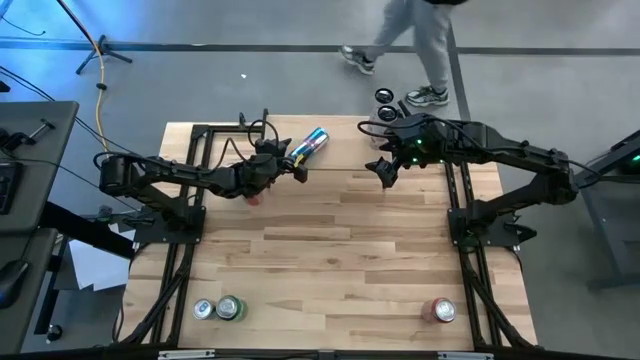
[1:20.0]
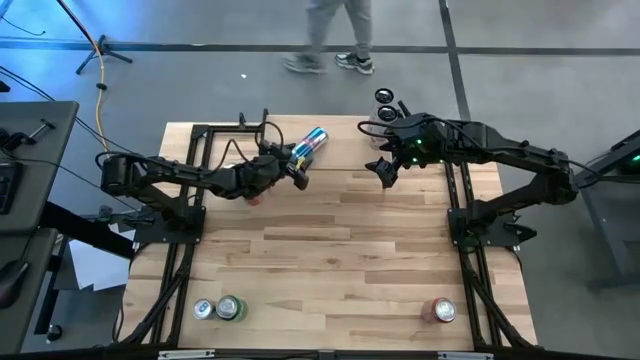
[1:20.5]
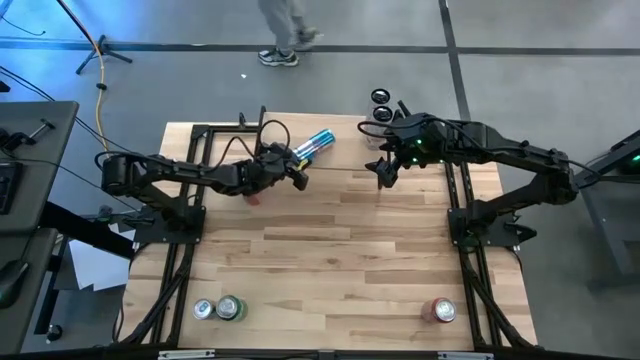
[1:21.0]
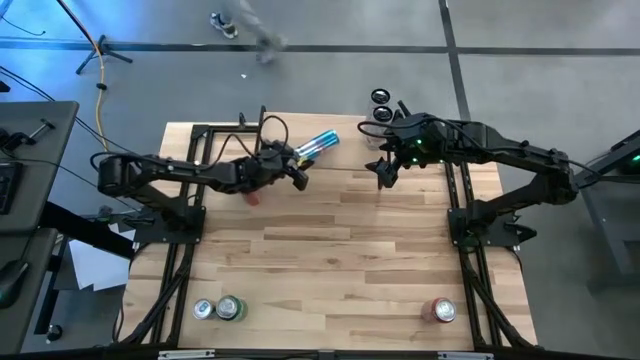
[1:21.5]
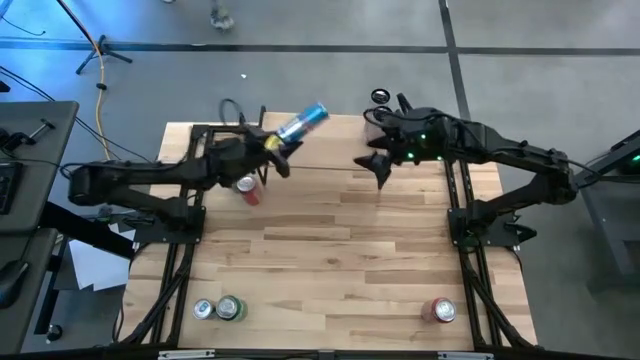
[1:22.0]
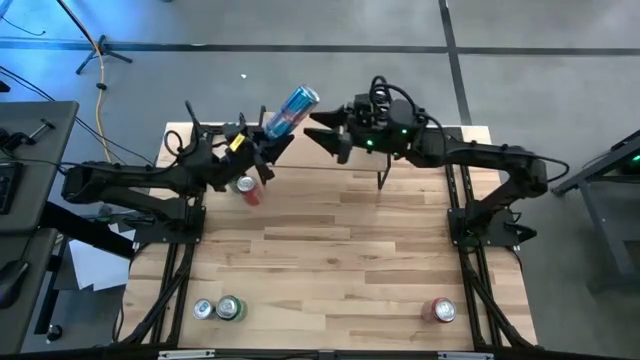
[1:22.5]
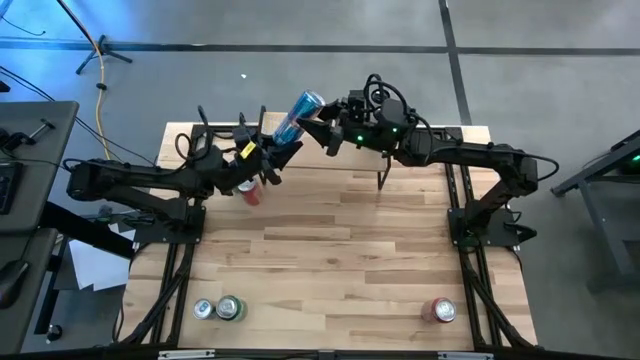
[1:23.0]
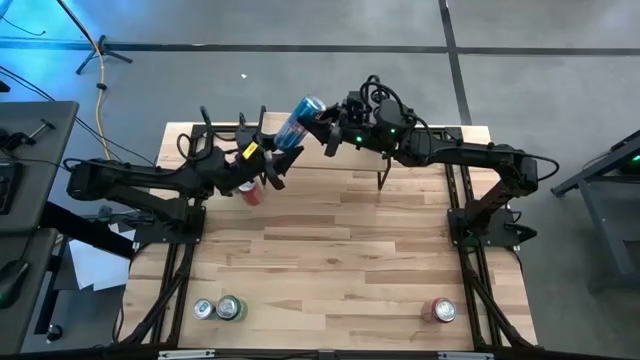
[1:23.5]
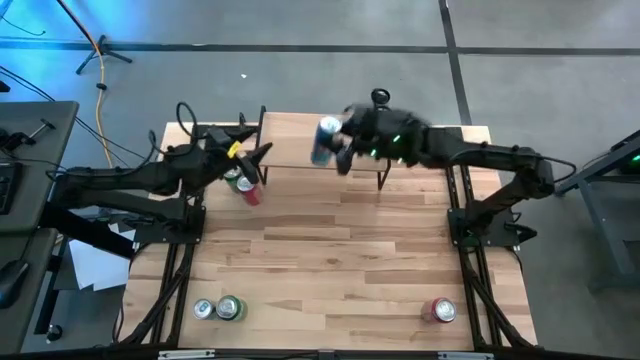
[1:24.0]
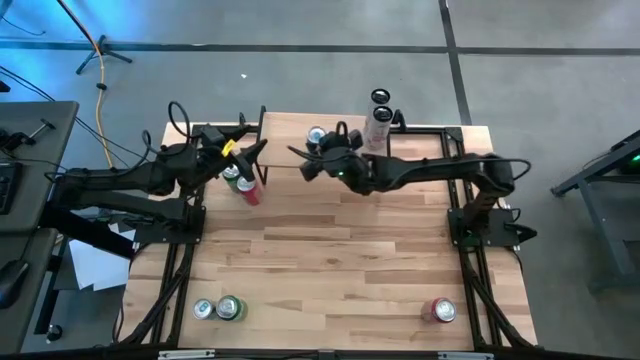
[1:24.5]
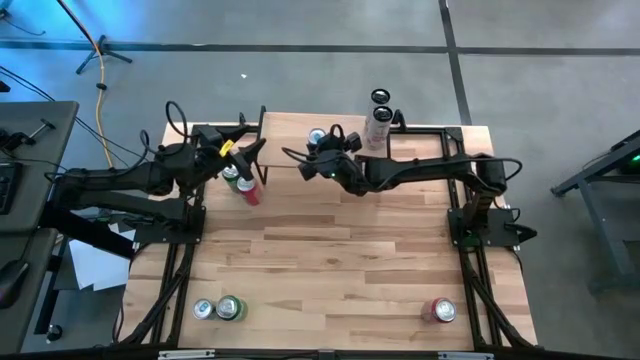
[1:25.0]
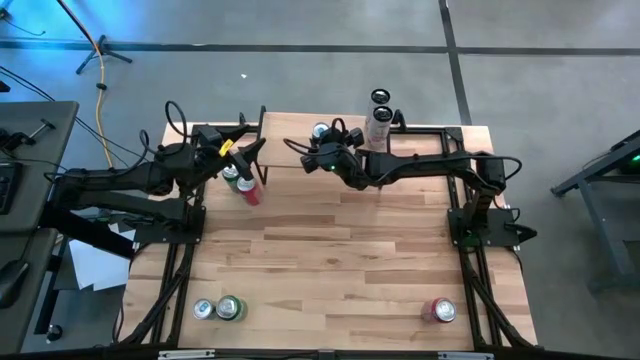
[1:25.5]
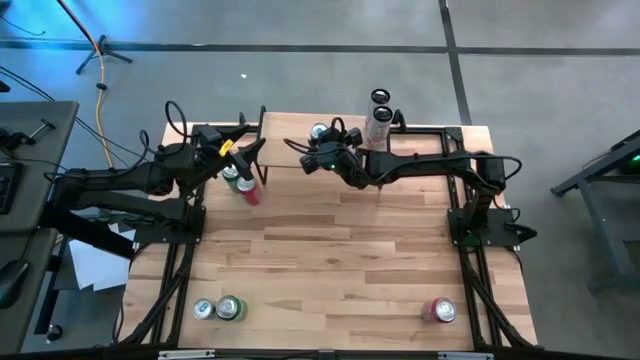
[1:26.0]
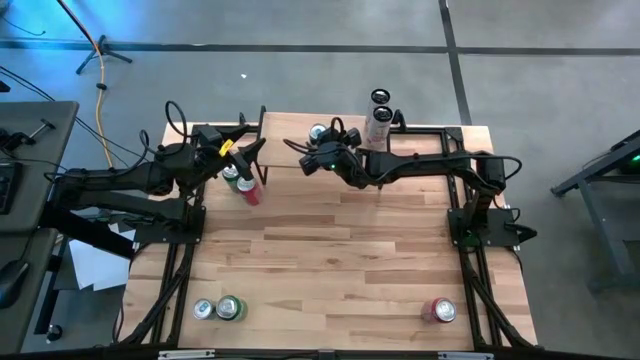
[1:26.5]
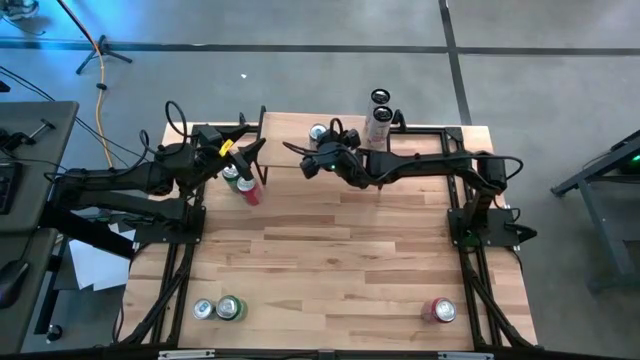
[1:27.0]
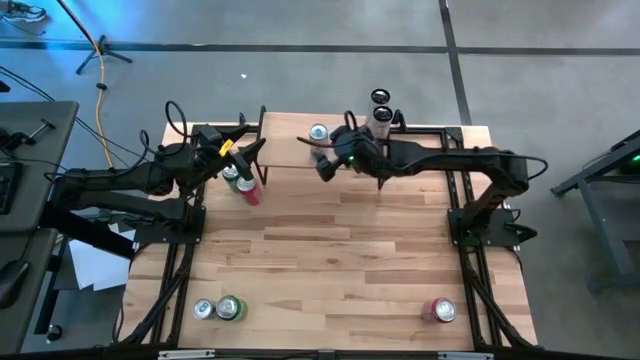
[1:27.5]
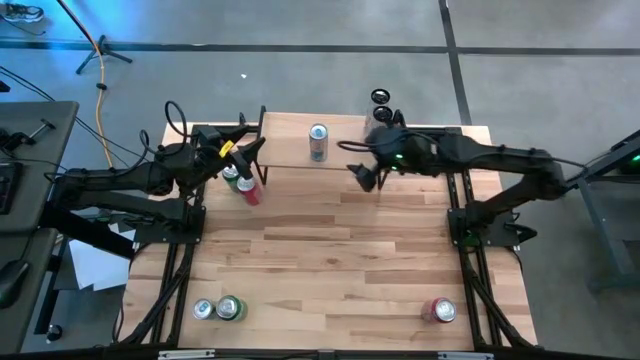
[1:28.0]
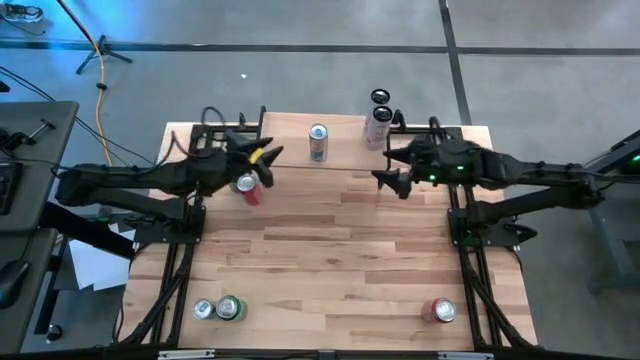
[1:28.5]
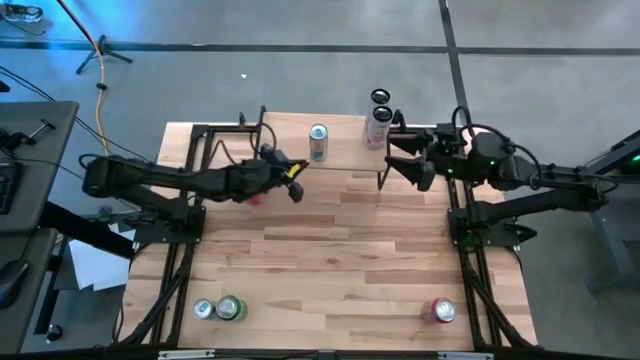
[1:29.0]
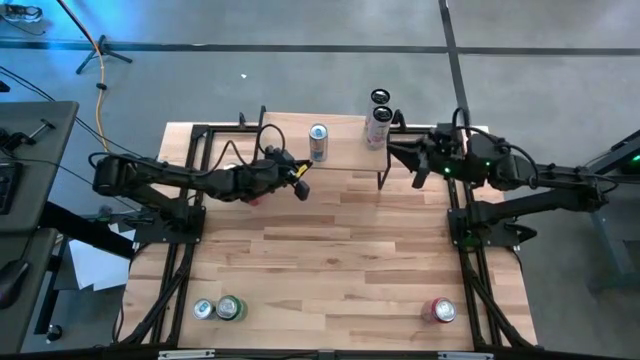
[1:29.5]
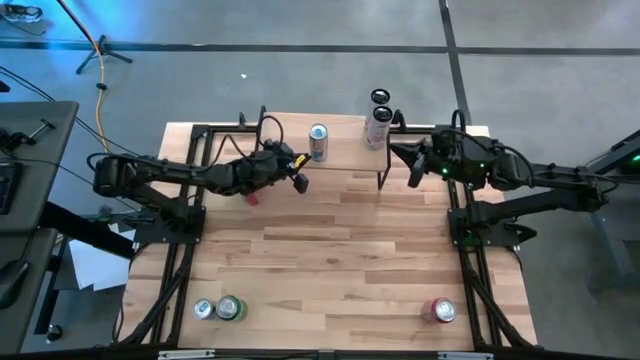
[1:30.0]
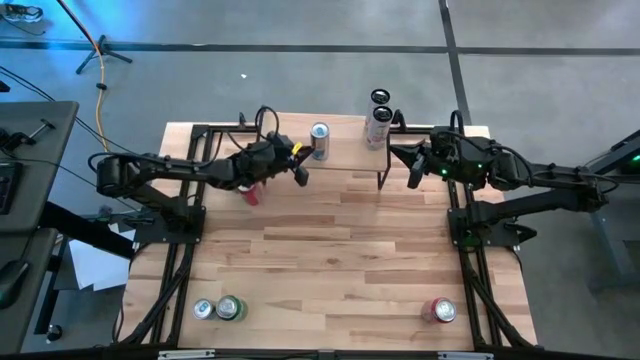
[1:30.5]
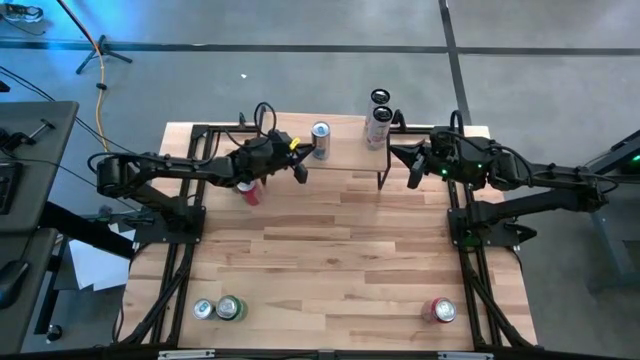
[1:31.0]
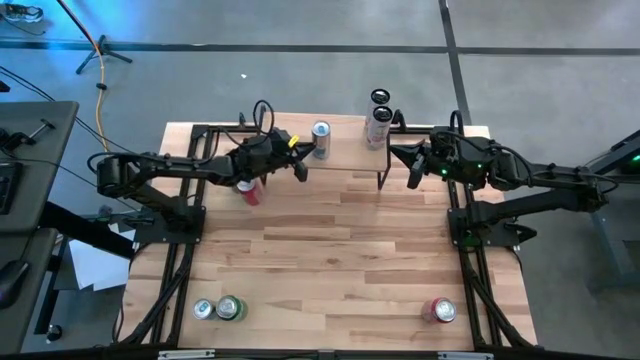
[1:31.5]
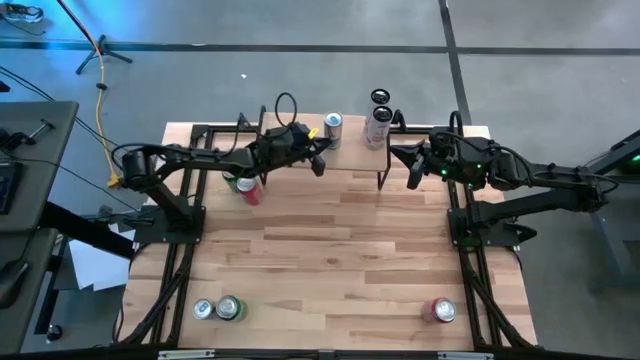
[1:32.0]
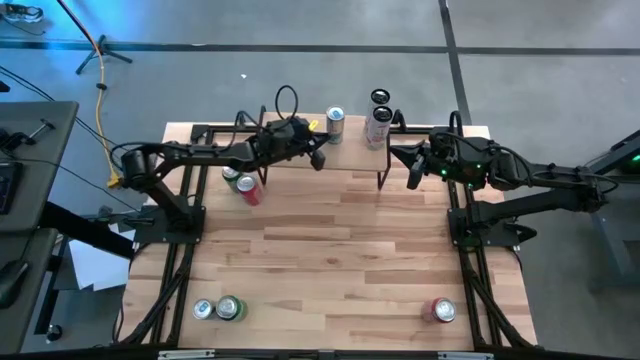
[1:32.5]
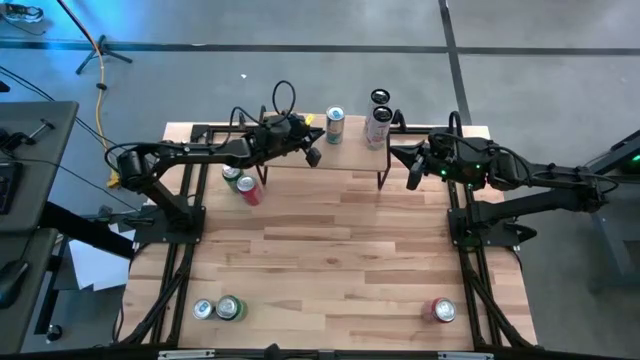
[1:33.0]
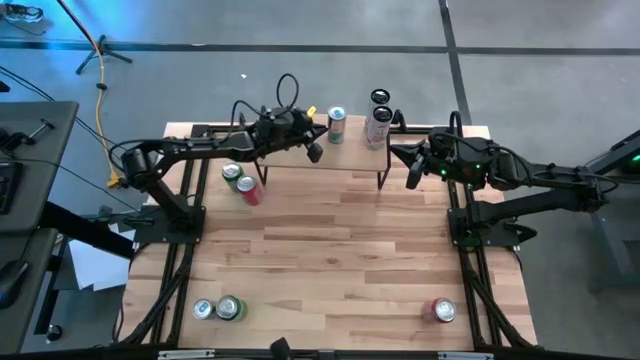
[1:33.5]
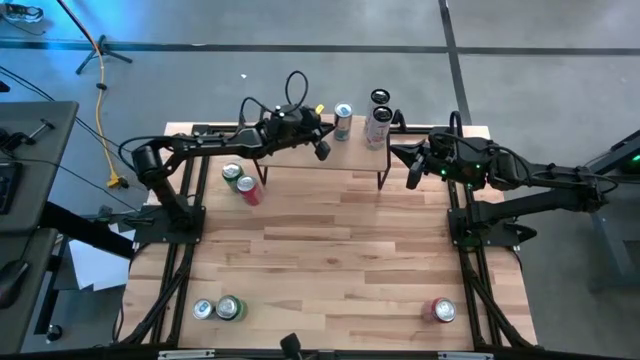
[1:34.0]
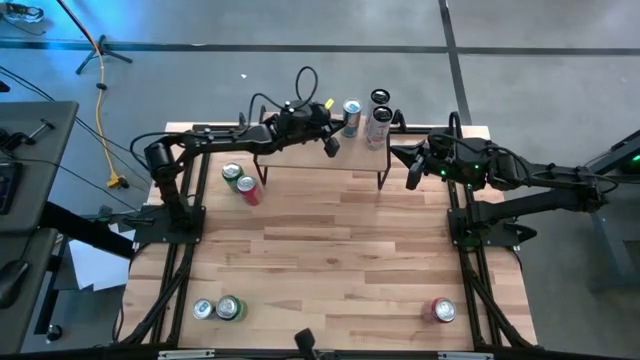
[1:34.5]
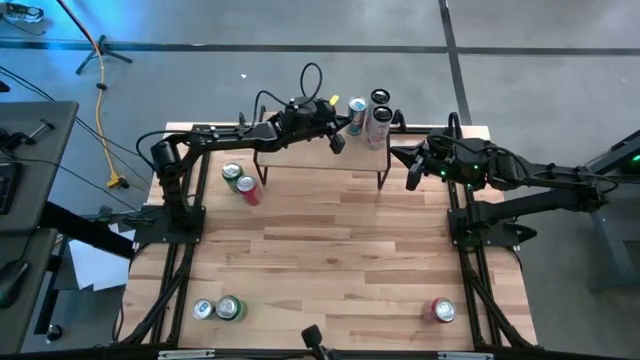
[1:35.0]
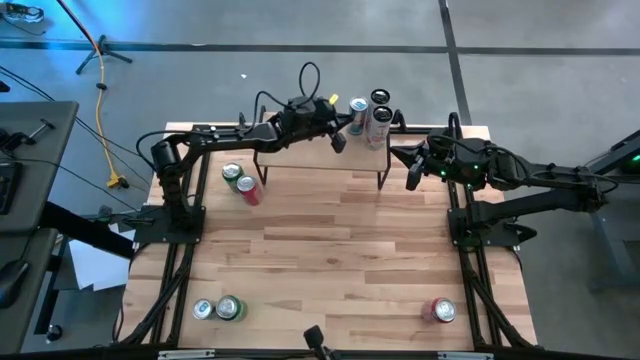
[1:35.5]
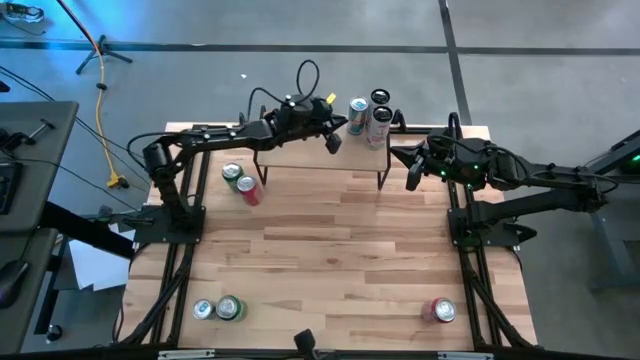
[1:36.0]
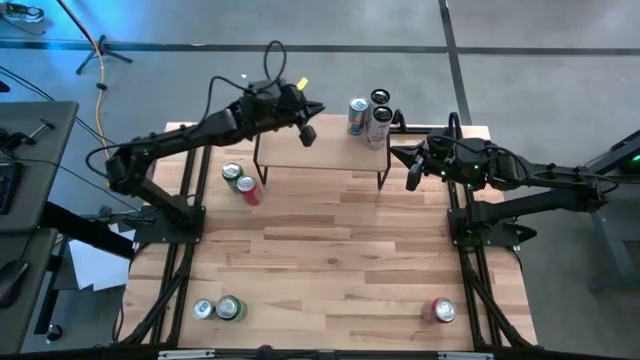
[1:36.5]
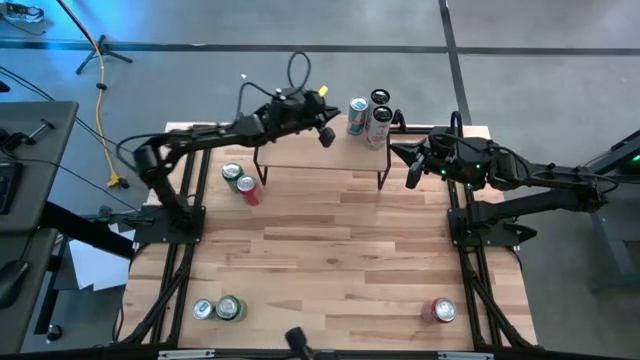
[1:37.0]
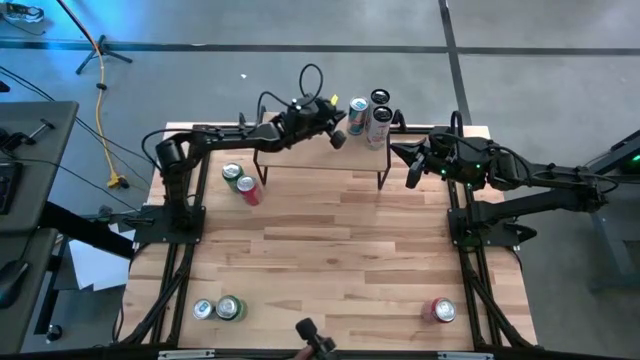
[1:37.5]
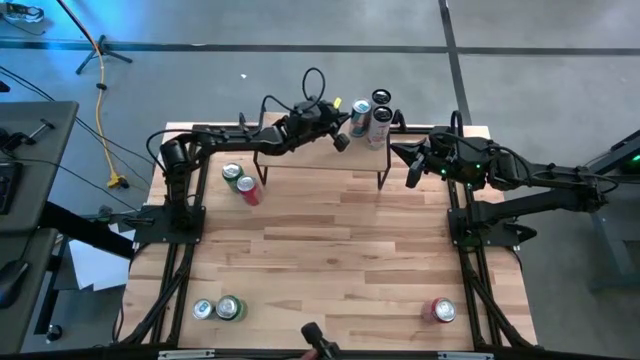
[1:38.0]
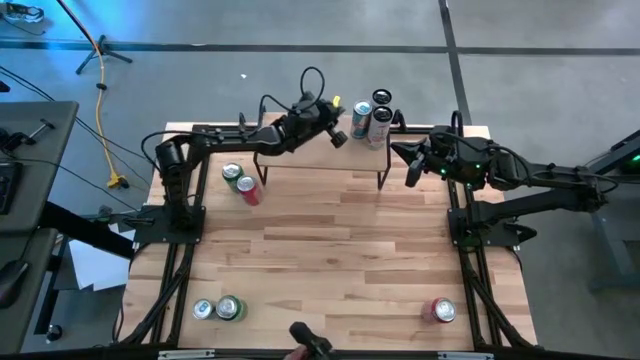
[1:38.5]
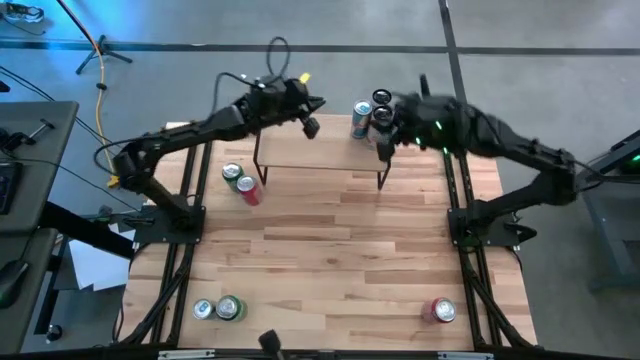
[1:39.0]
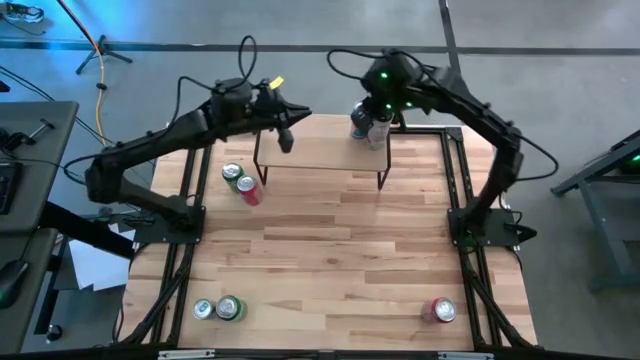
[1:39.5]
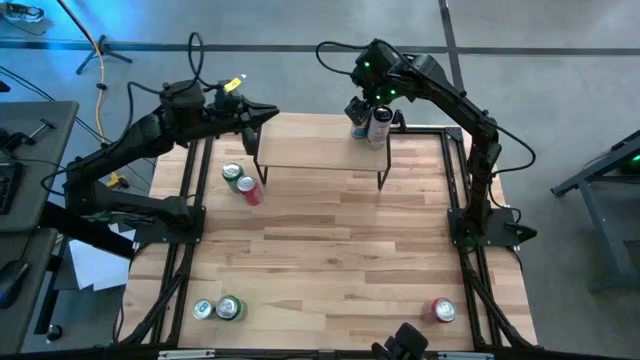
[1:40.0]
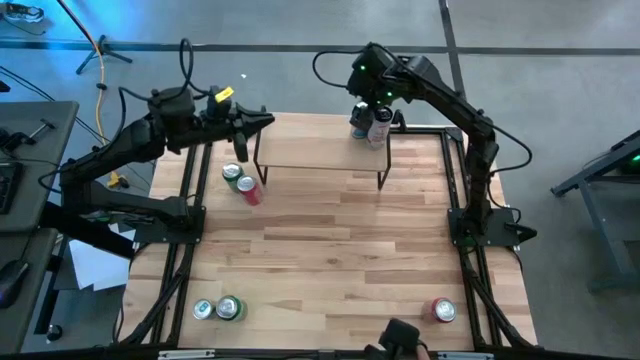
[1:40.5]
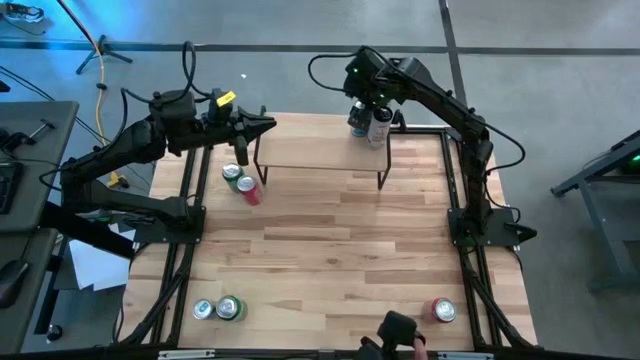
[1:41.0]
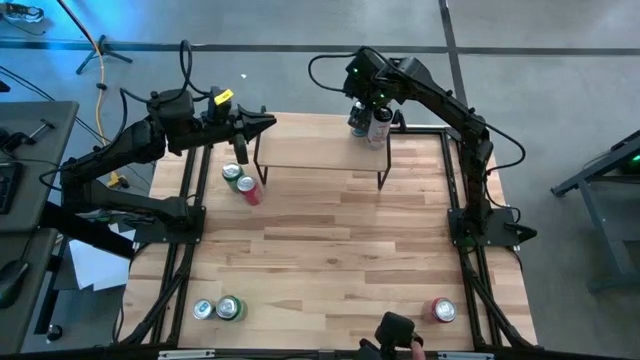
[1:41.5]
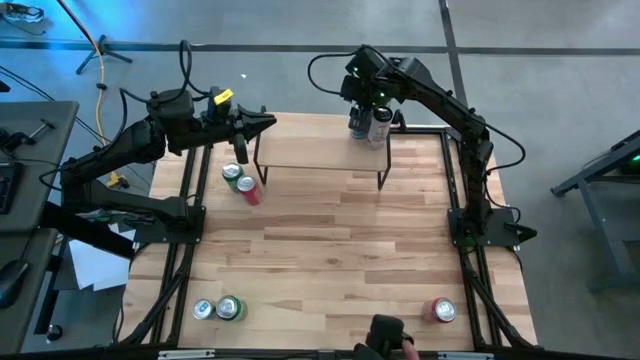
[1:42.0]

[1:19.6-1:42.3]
Task: Place canned beverage on shelf
Put the top blue soda can onto the shelf
